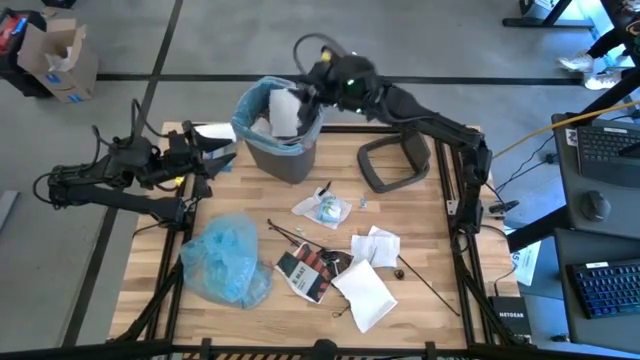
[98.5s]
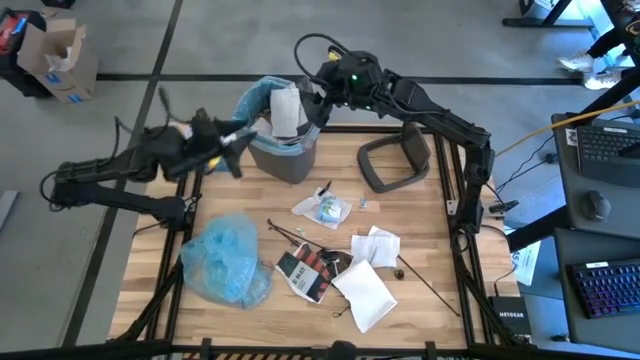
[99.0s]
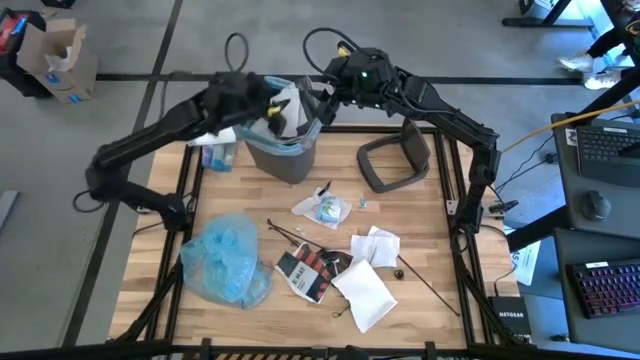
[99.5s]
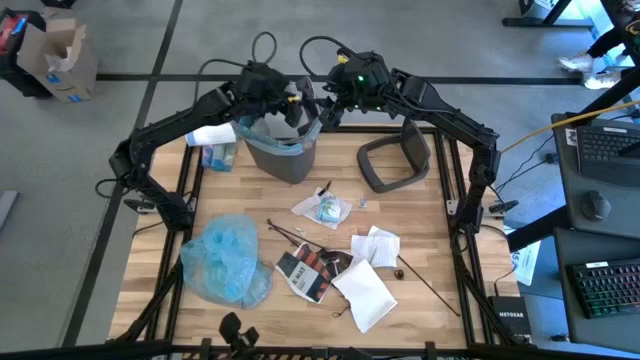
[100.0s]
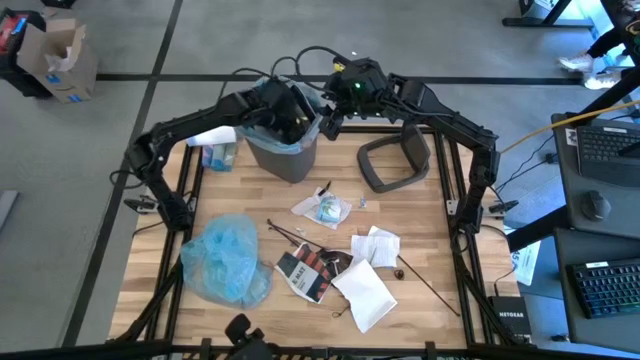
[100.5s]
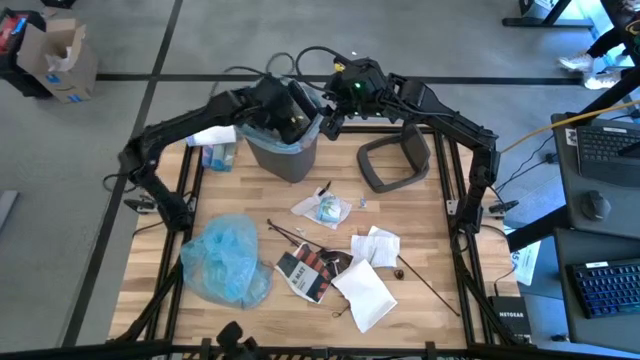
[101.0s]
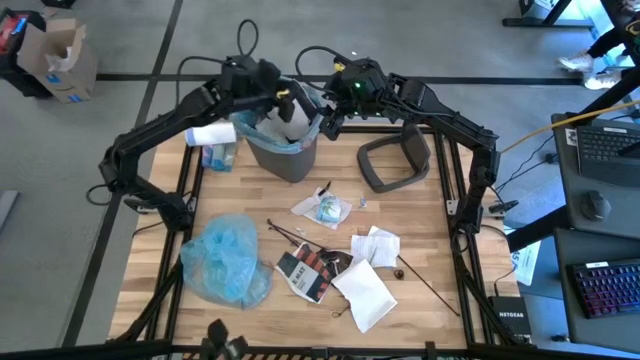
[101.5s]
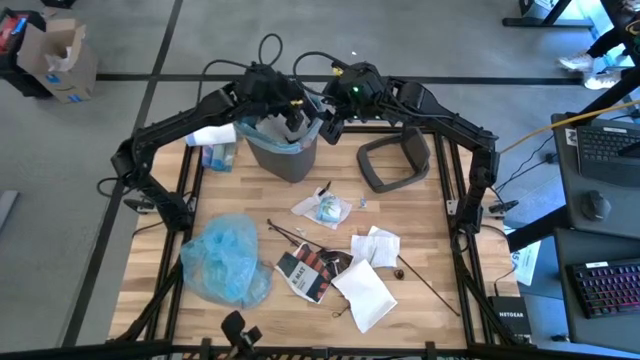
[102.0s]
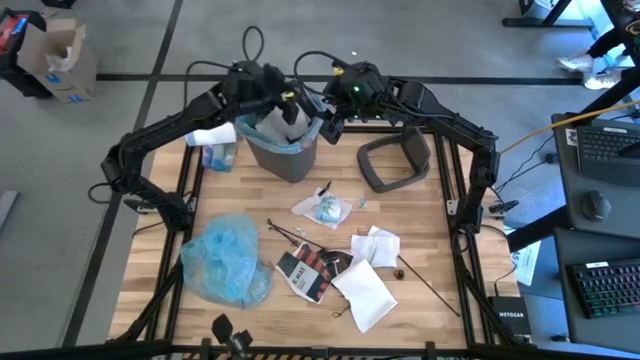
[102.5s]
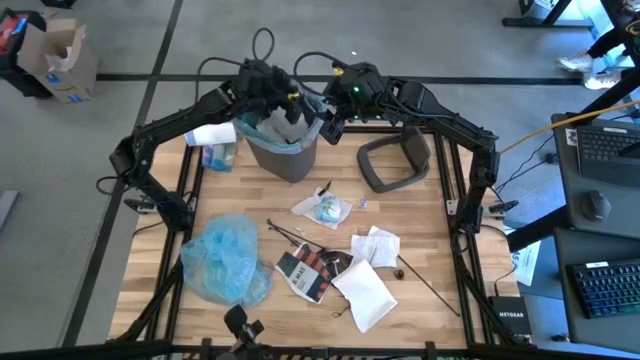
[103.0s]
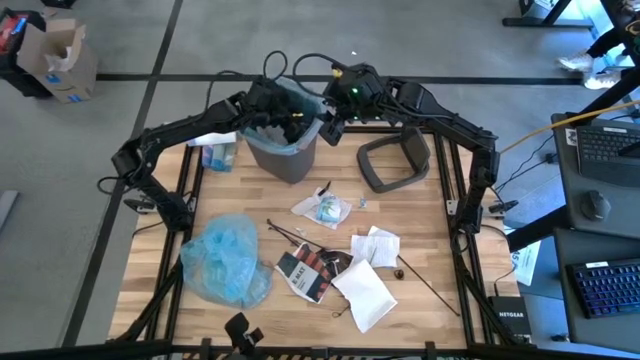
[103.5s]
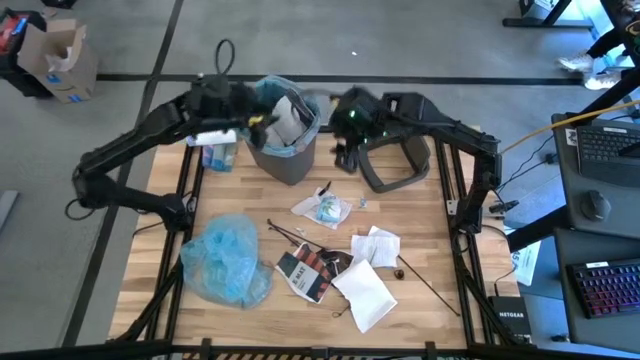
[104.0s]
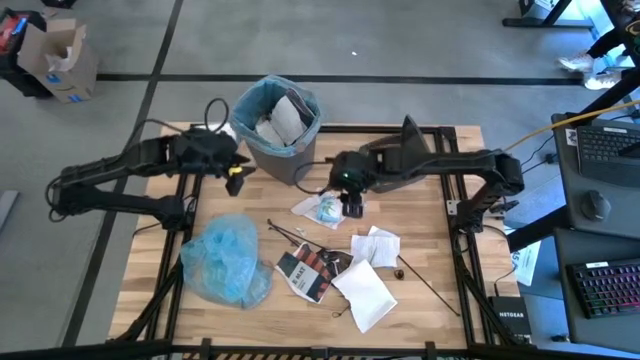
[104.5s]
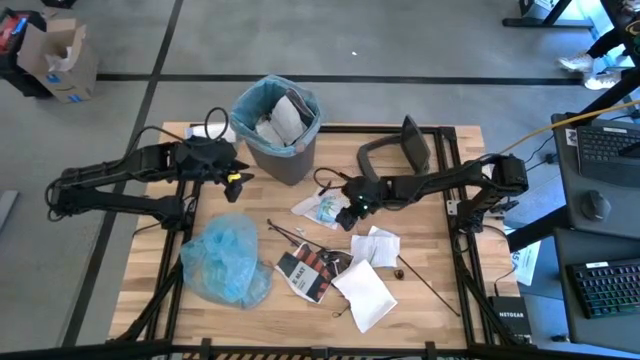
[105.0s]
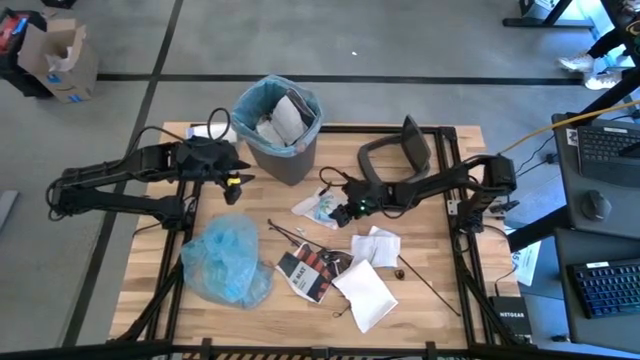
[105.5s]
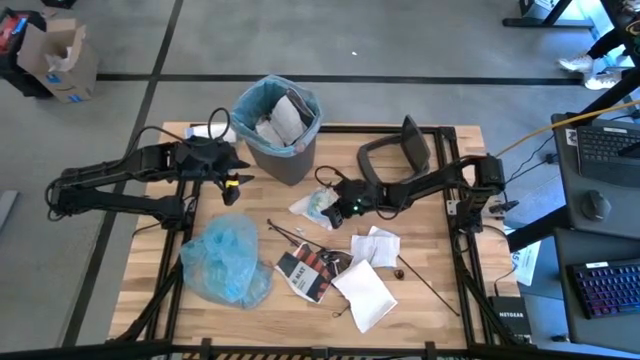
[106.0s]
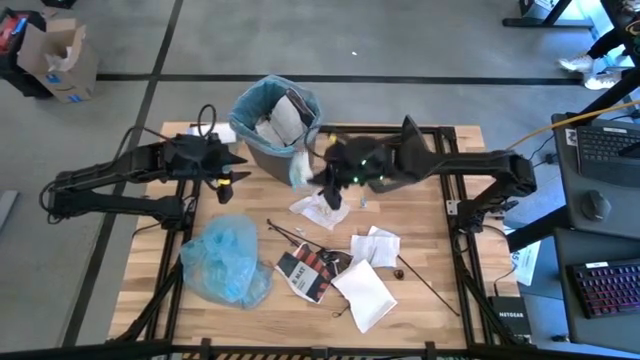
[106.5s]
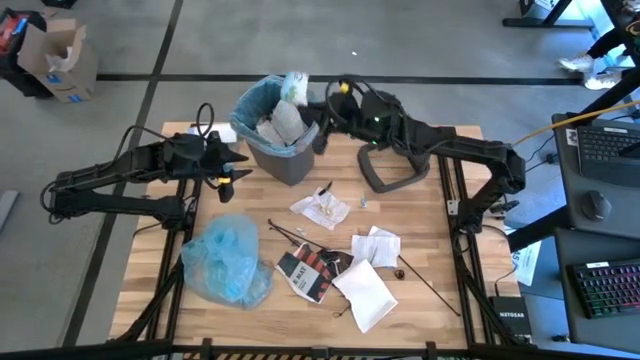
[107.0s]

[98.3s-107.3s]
Task: Pick and place trash into bin
Put the blue carton into the trash bin

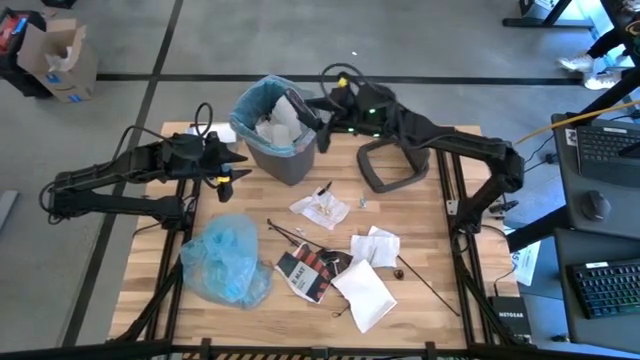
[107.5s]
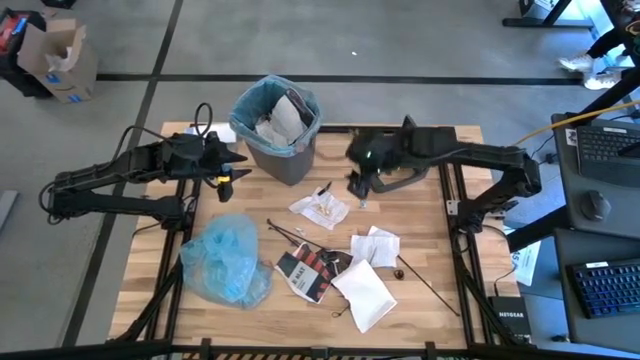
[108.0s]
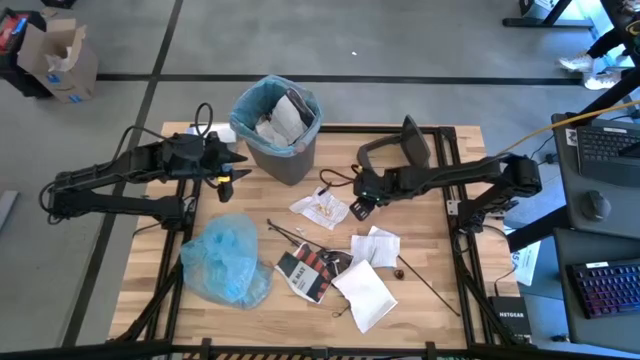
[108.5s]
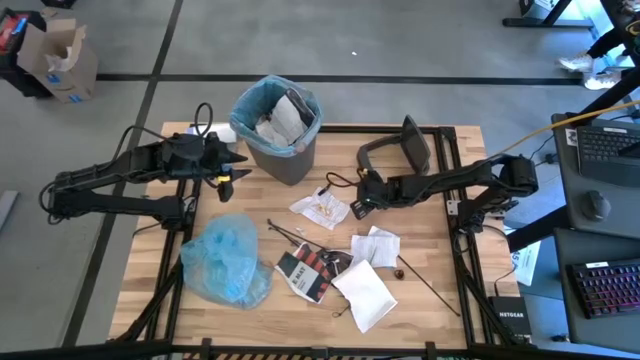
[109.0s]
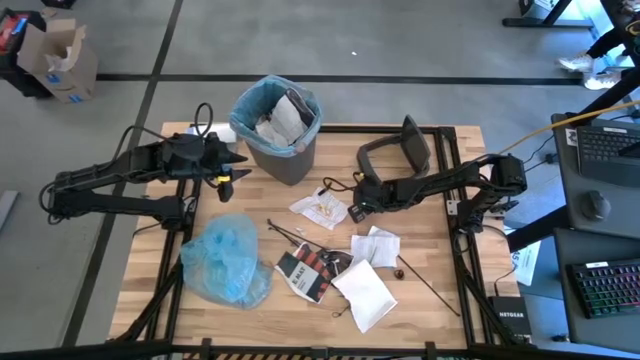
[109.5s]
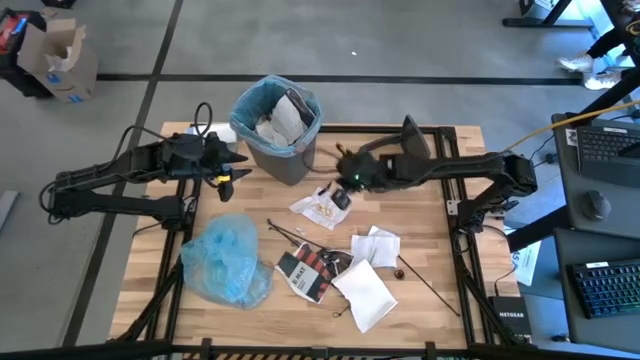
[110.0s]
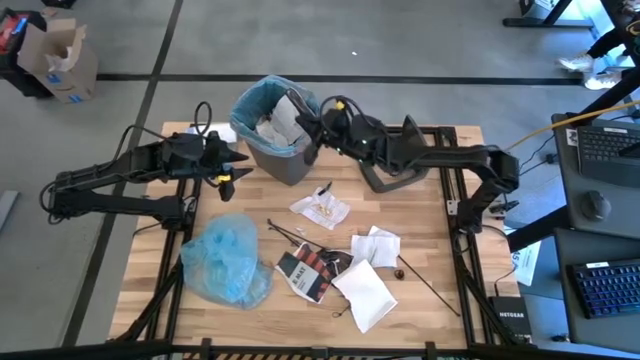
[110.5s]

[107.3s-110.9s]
Put the blue paper into the trash bin

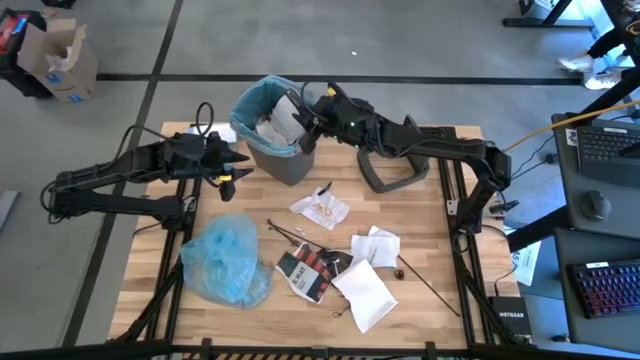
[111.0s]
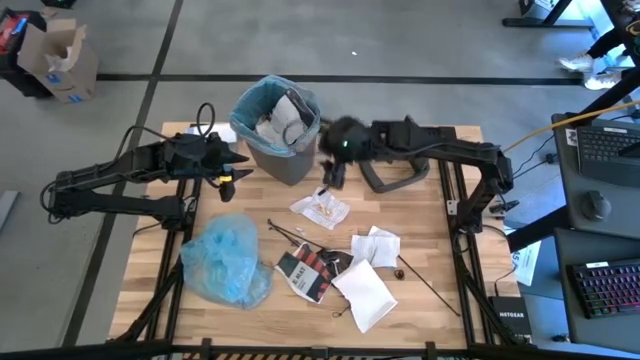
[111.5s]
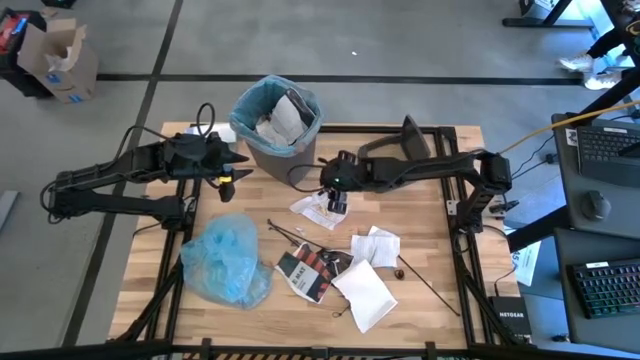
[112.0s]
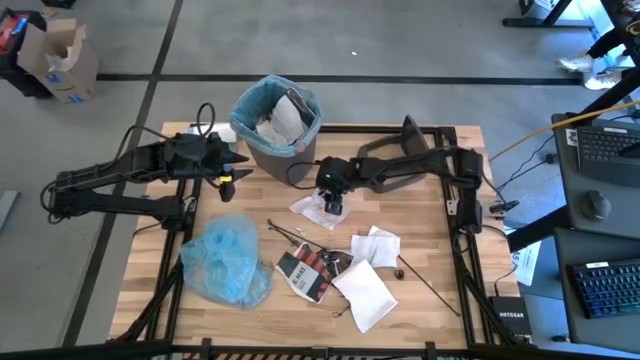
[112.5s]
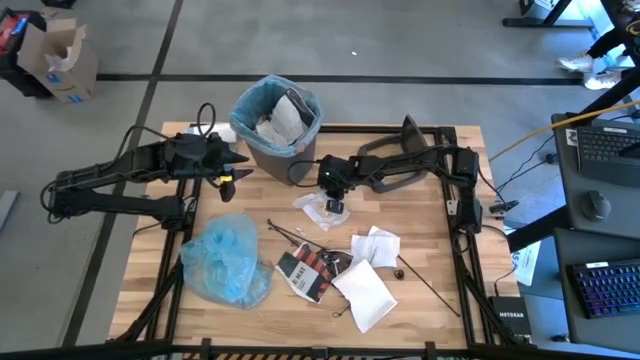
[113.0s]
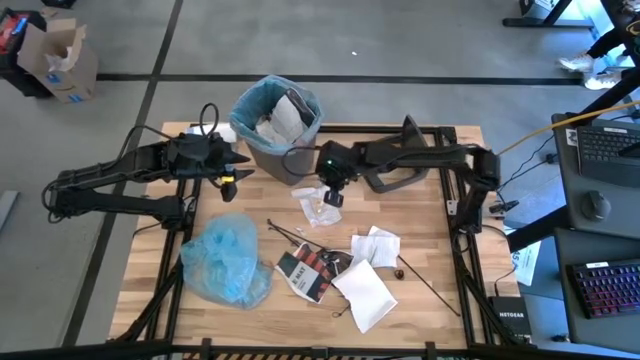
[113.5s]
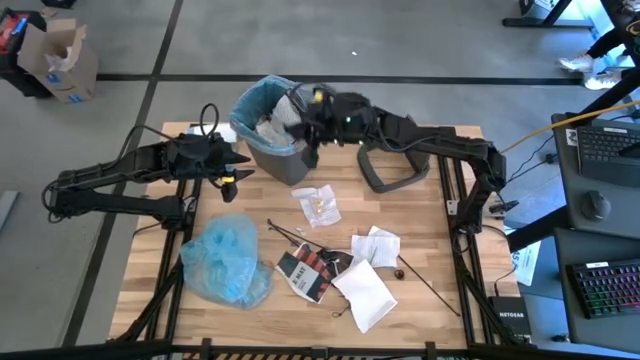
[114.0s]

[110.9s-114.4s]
Put the black cellophane into the trash bin

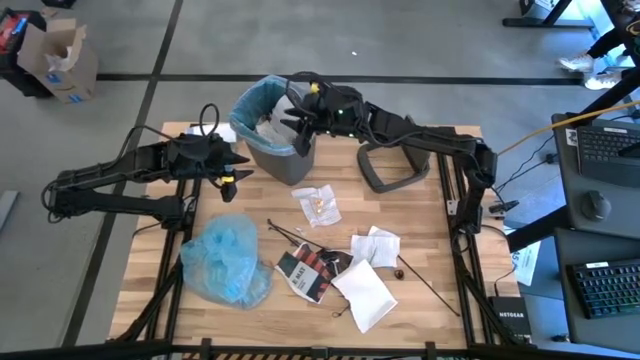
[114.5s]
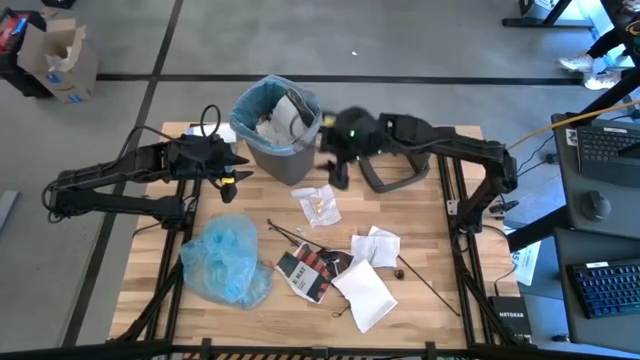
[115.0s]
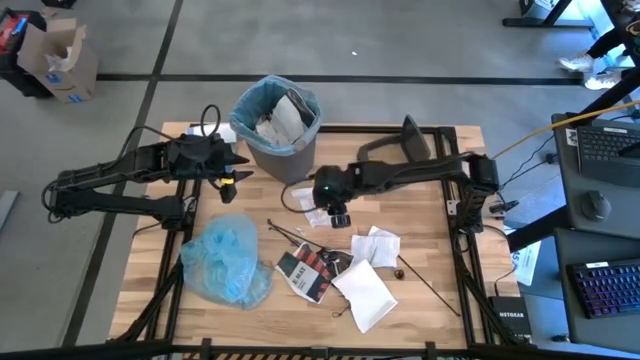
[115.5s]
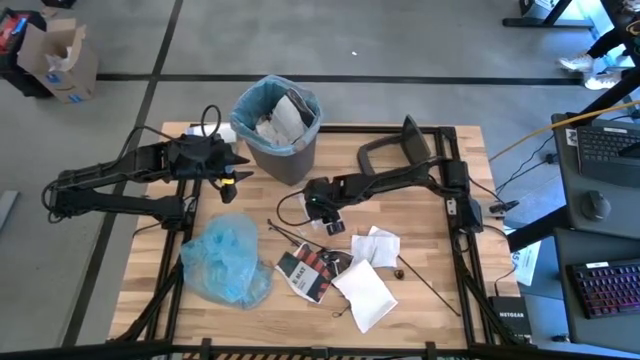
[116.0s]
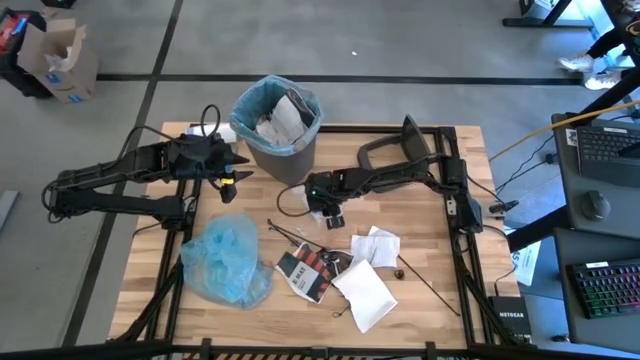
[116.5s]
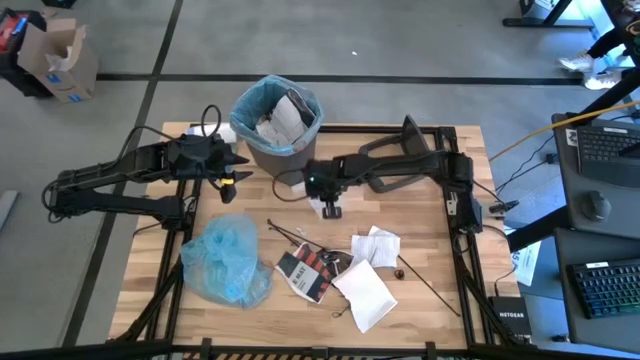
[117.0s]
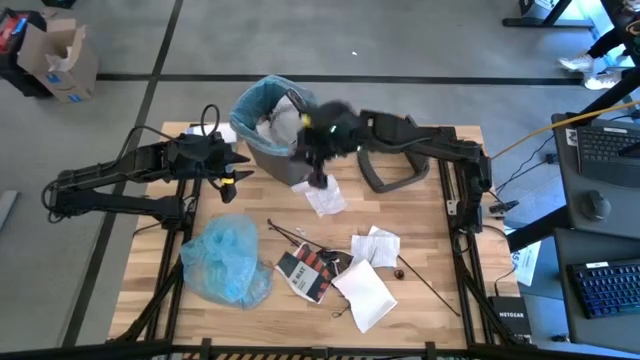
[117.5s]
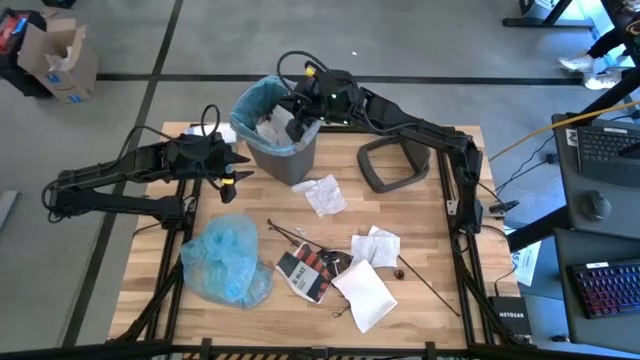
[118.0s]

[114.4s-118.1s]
Put the yellow candy wrapper into the trash bin

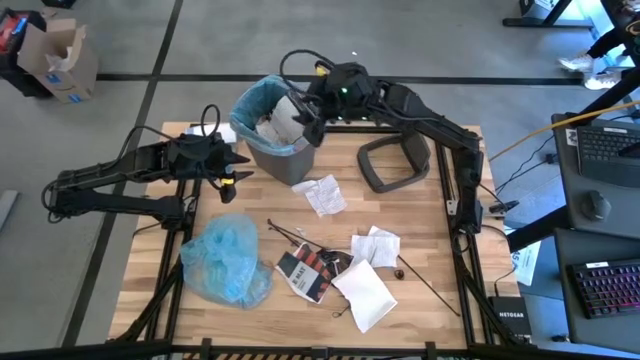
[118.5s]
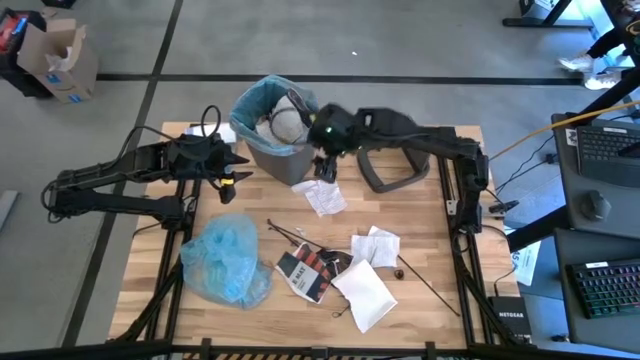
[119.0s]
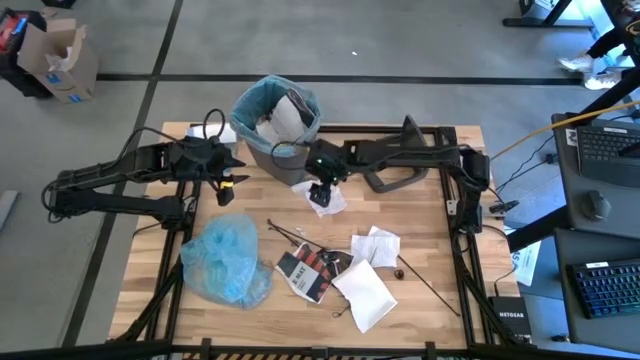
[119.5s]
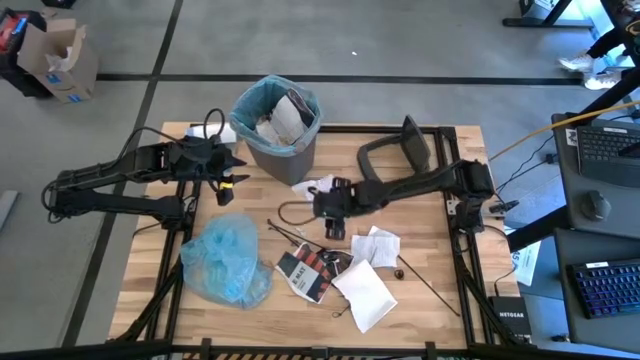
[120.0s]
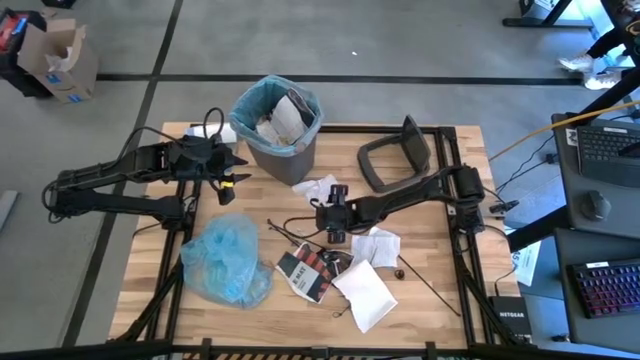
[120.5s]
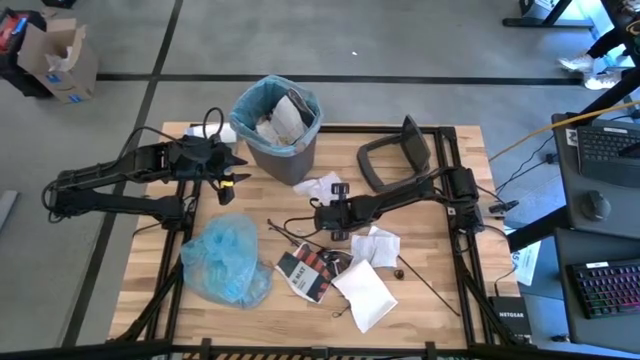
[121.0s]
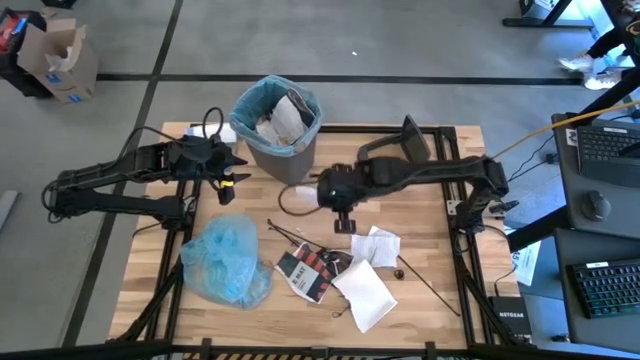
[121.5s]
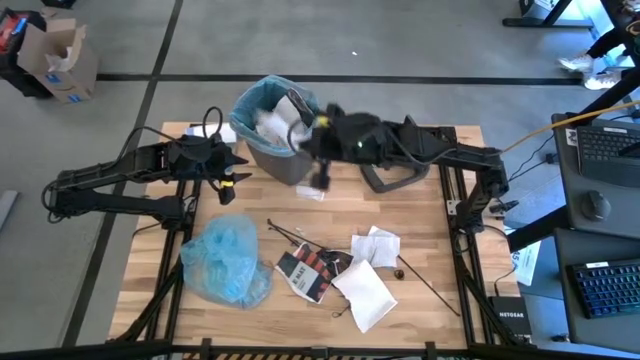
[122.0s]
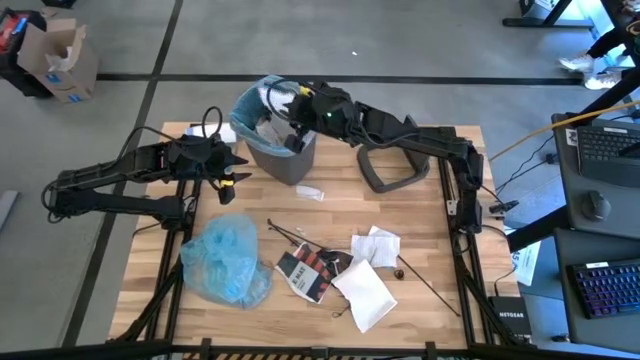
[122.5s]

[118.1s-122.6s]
Put the white notebook into the trash bin
